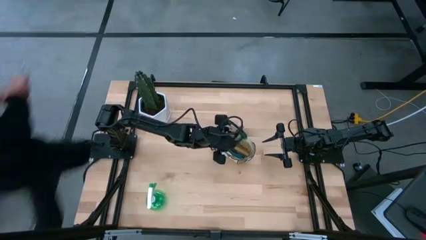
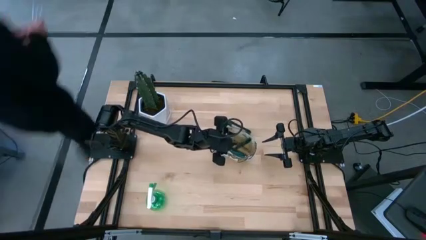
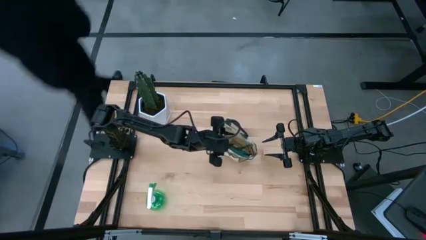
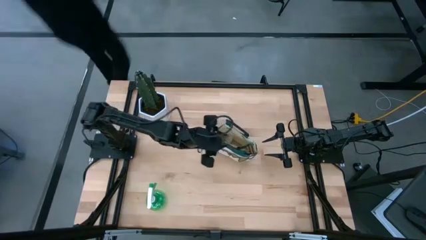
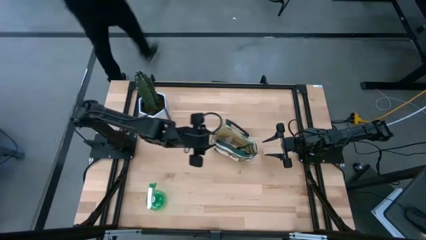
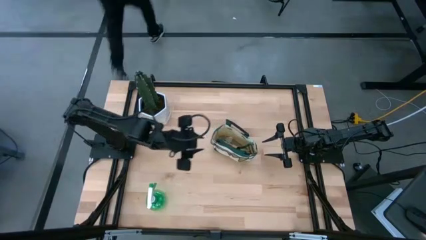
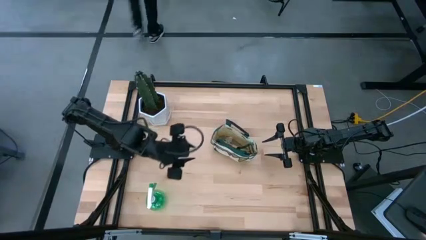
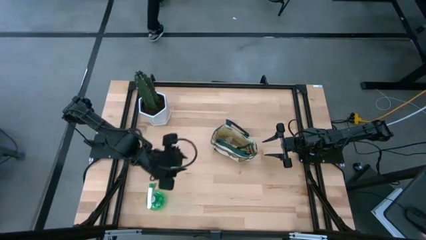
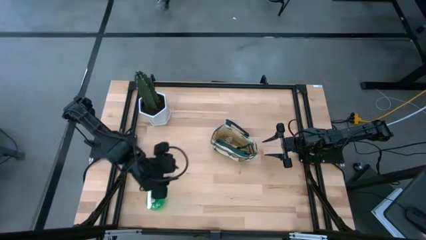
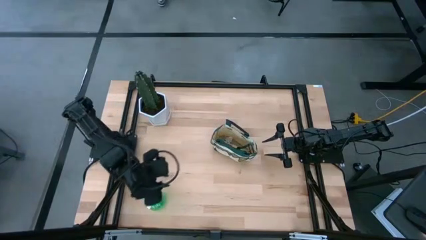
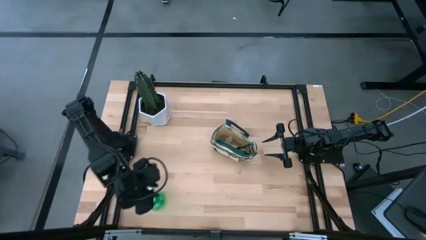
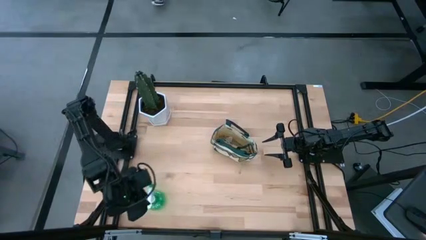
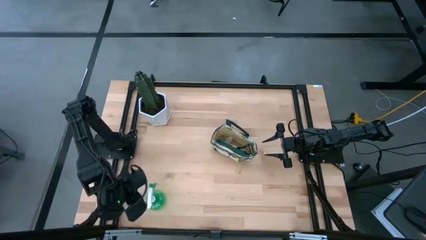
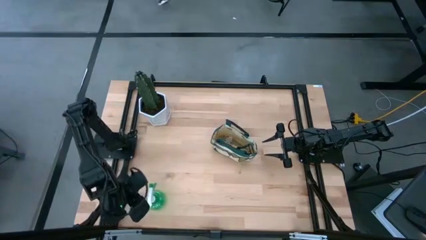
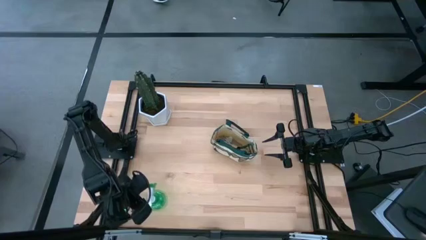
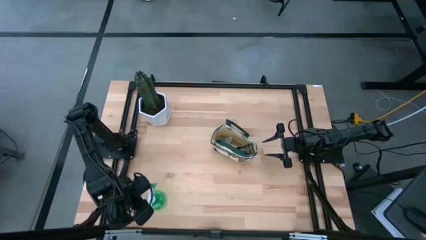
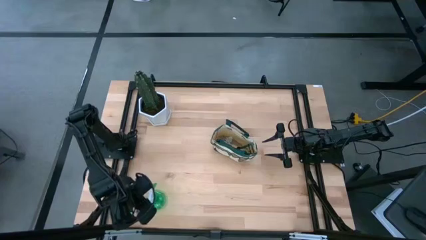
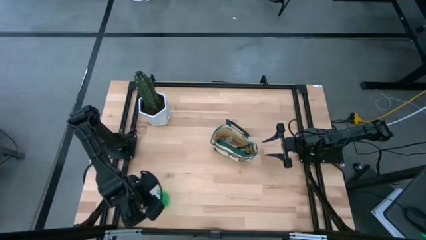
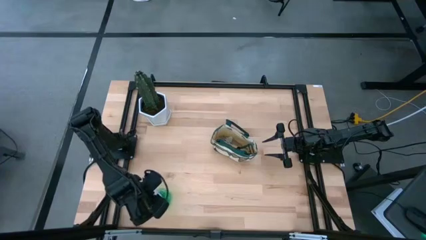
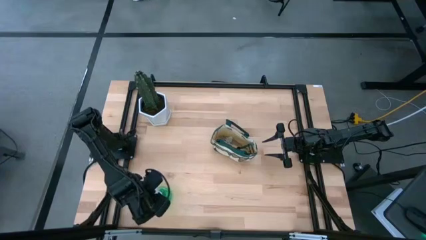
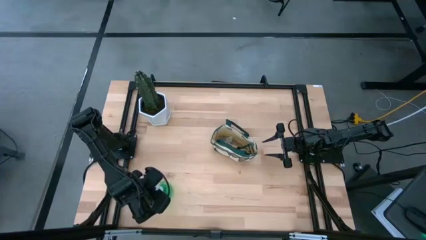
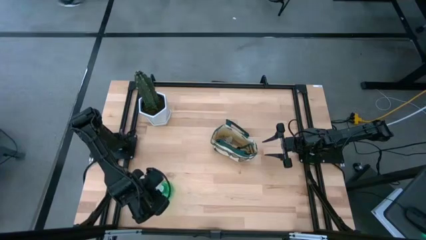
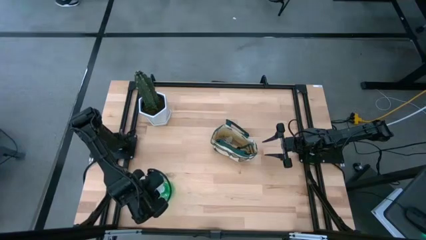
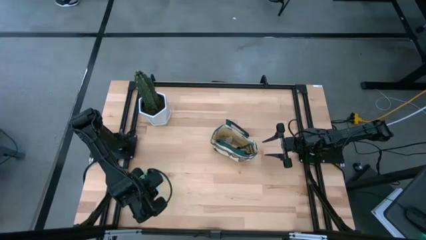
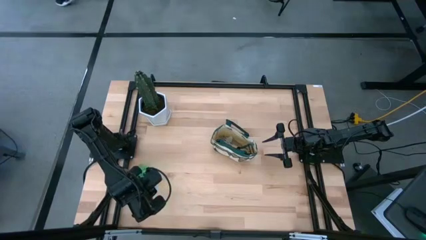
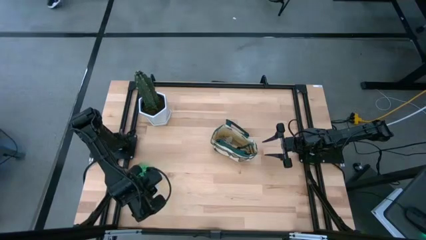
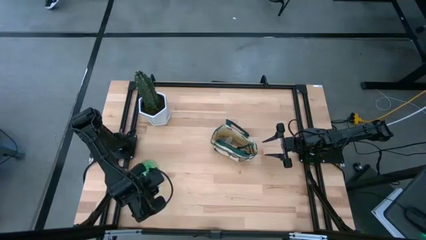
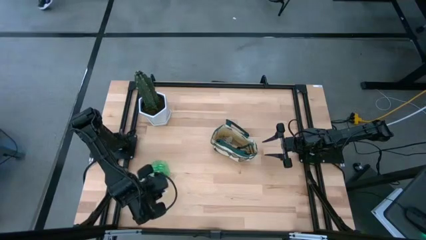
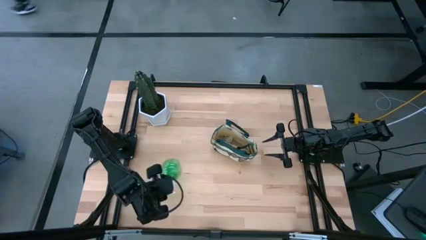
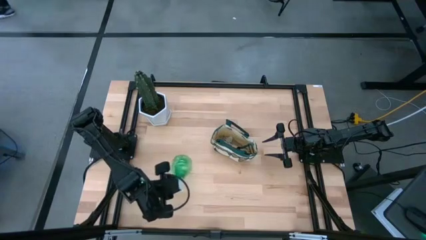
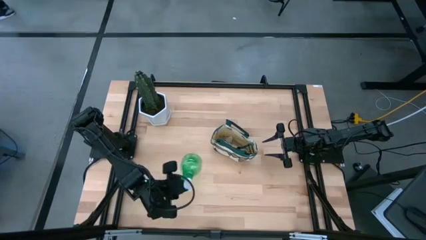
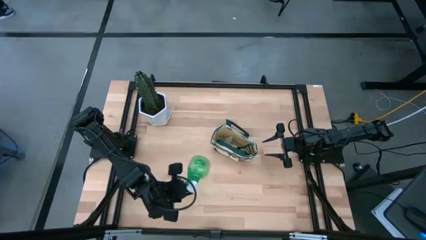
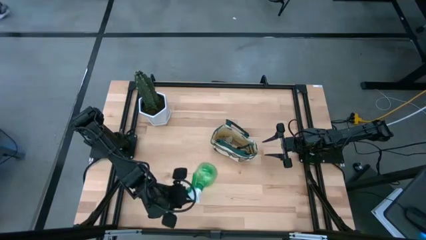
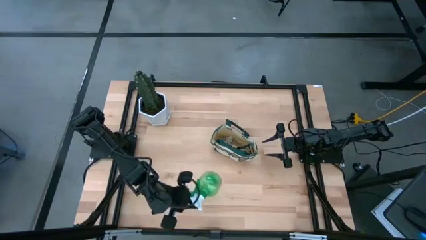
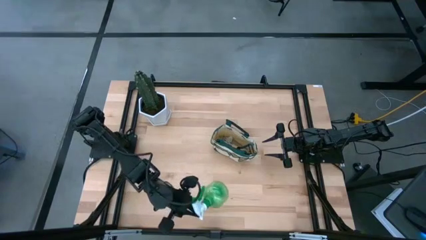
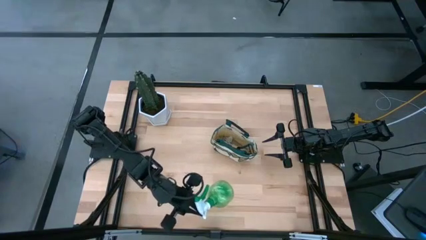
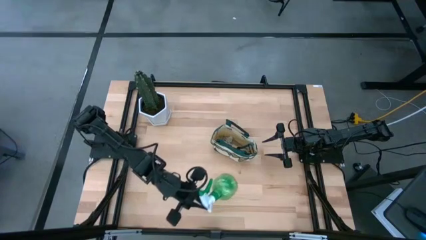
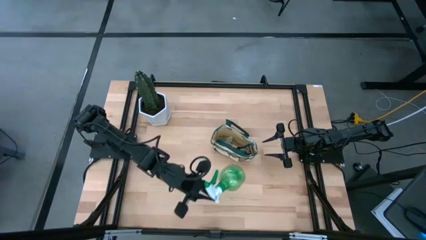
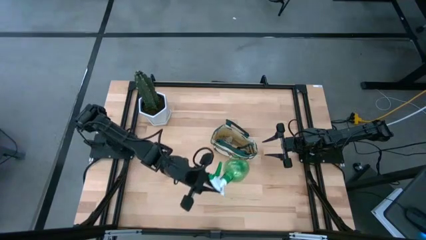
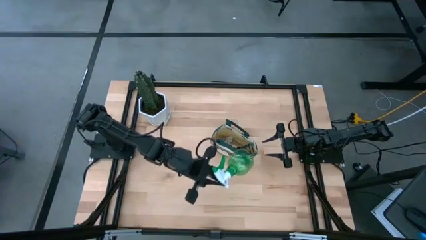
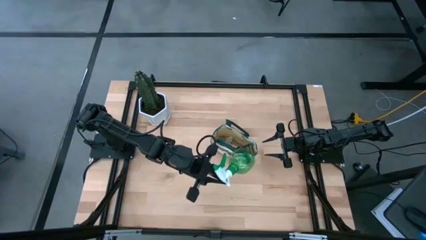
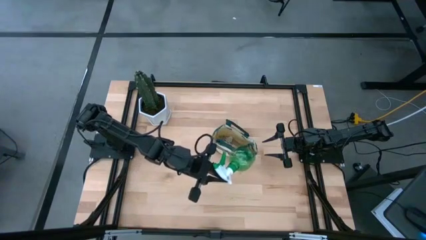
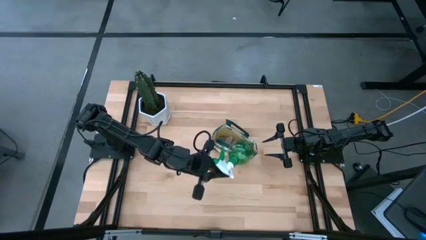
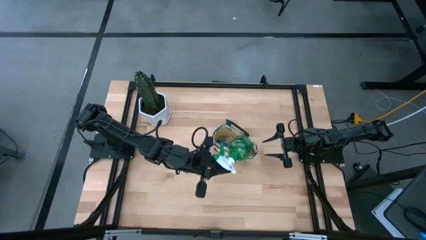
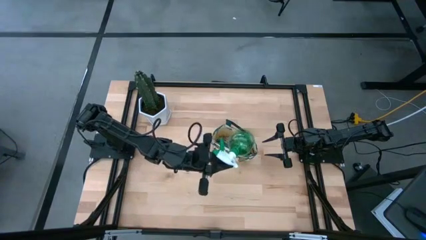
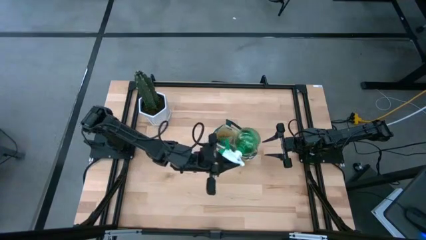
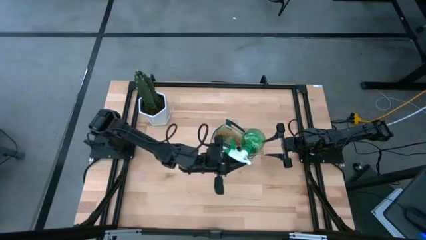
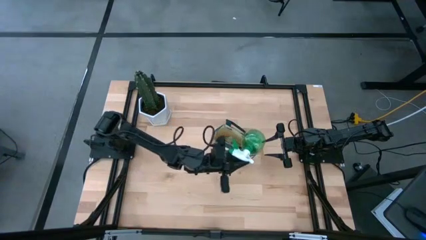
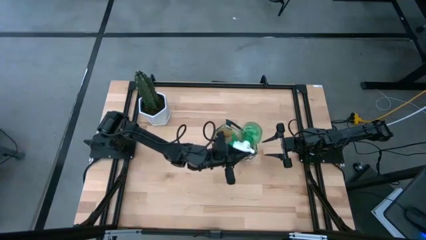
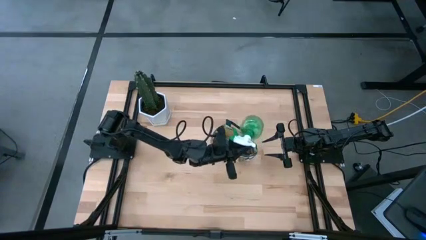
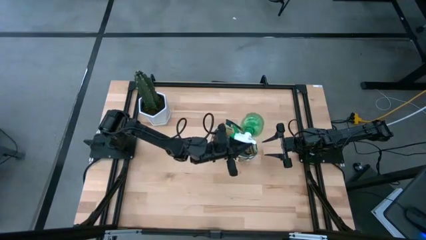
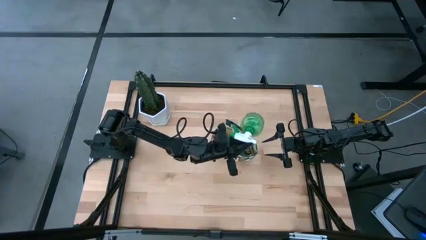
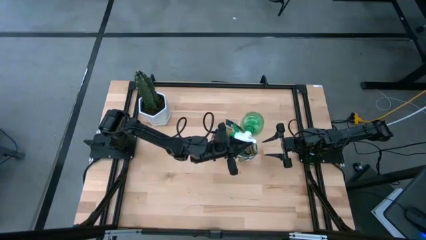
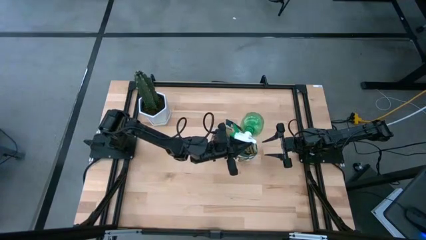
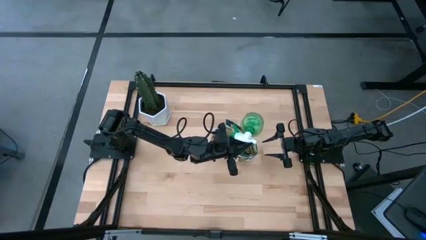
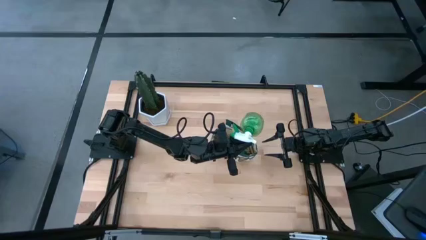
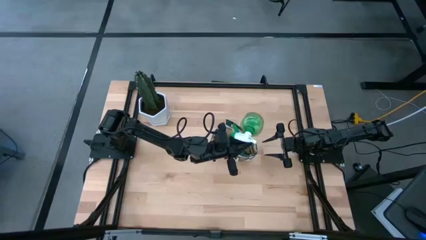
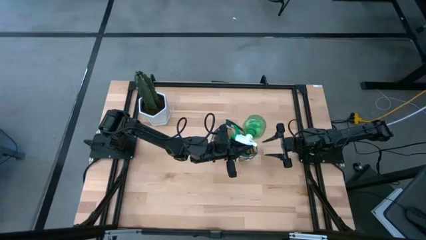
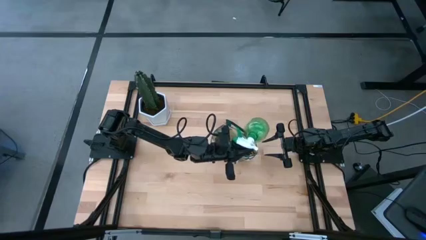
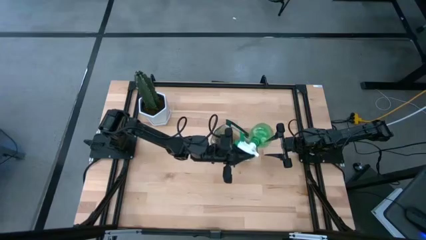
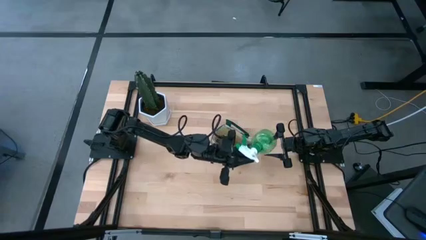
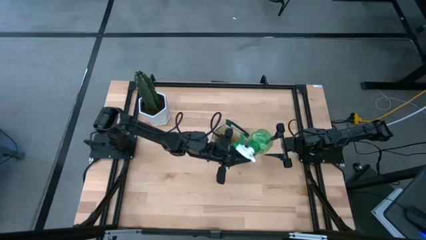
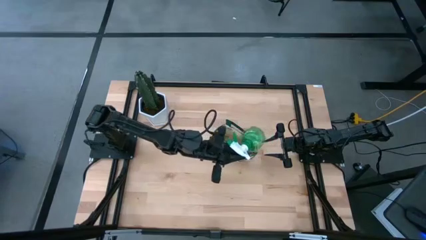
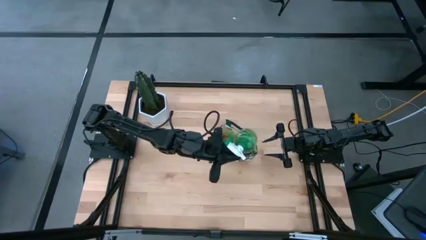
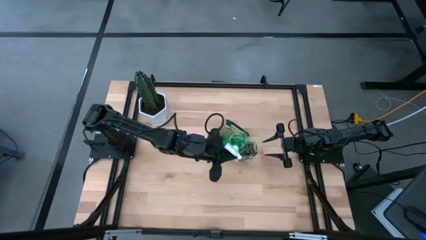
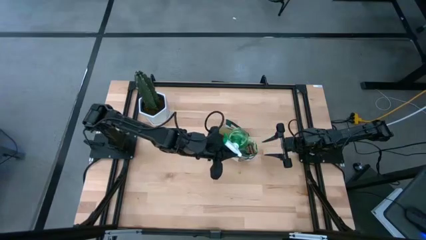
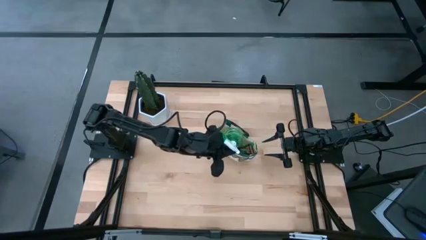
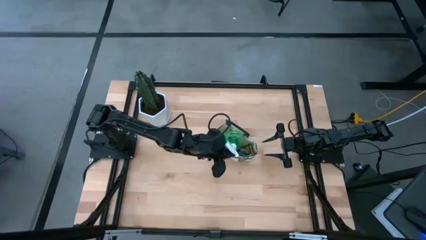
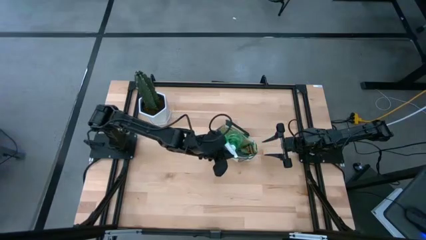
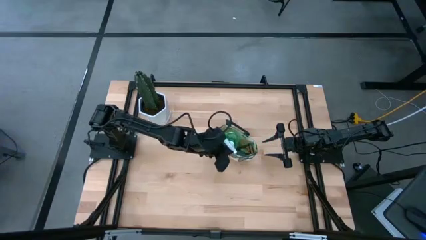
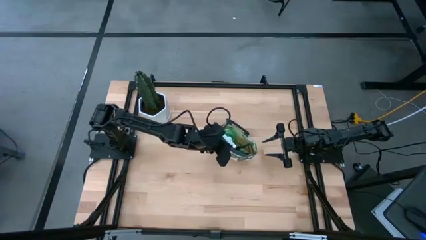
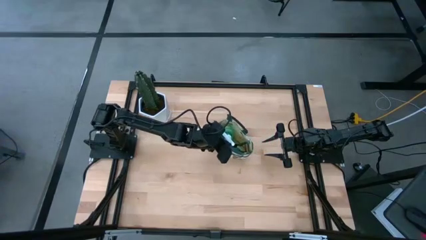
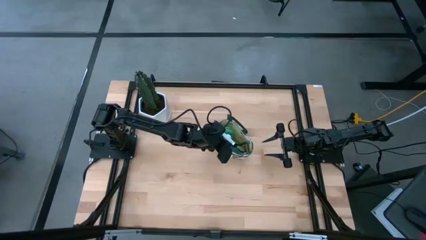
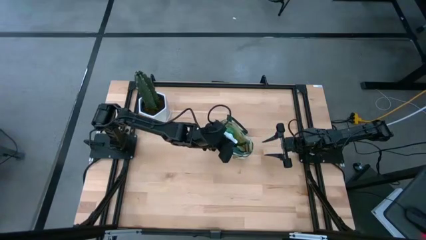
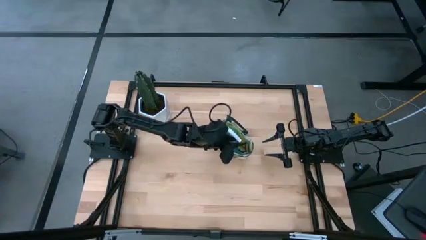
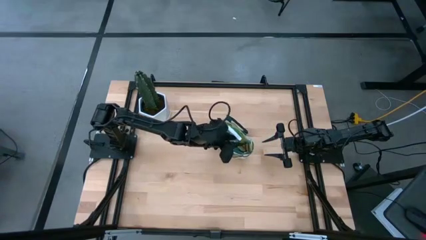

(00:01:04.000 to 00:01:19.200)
Task: Pick & Place Garden tools in Gardening bag
Put the green spray bottle into the gardening bag

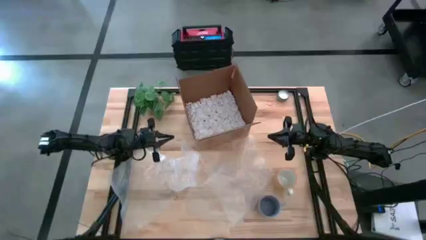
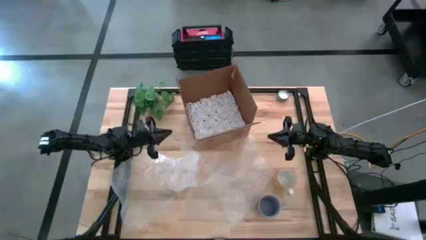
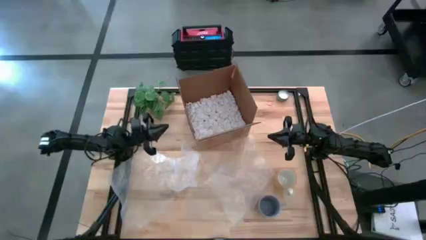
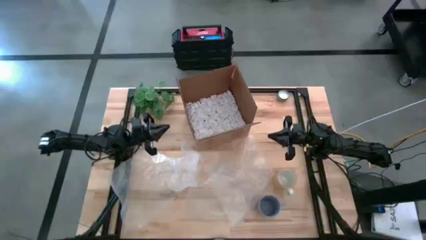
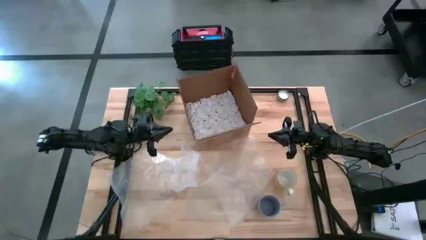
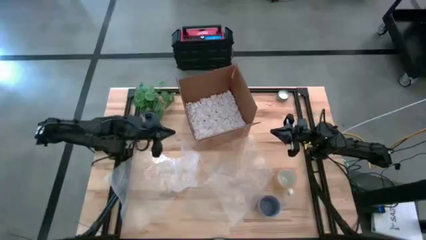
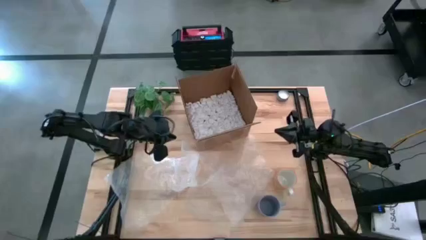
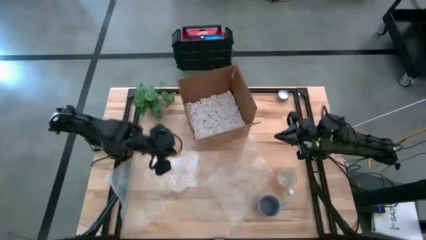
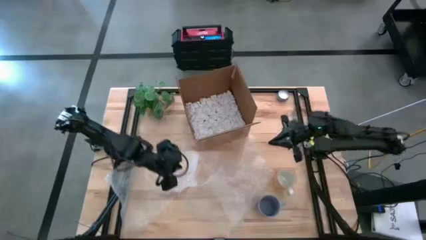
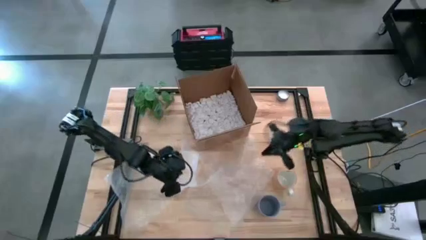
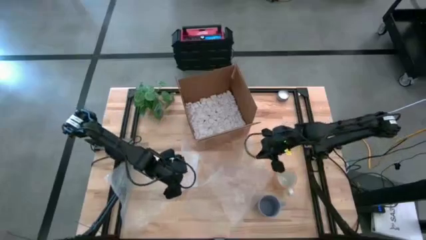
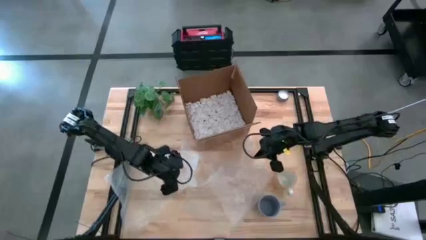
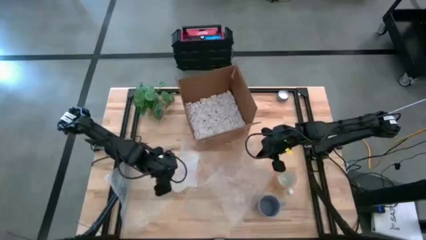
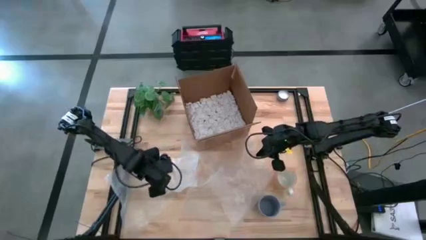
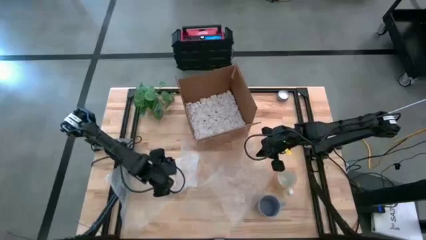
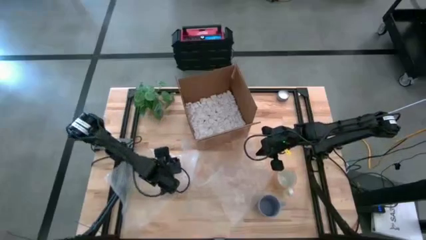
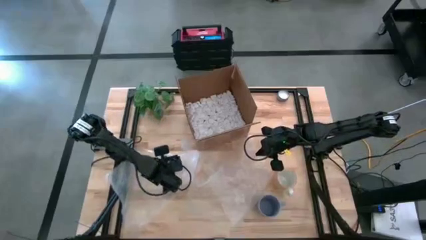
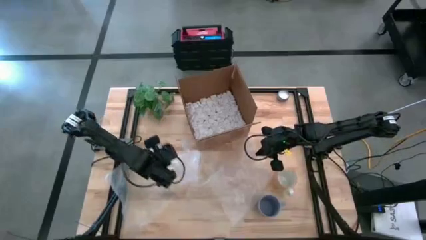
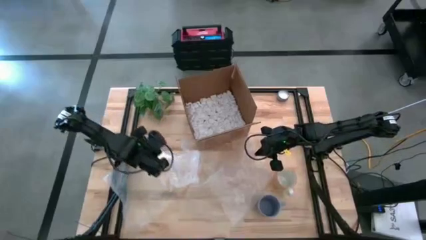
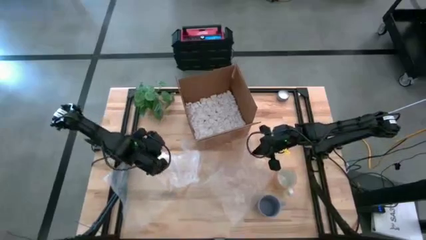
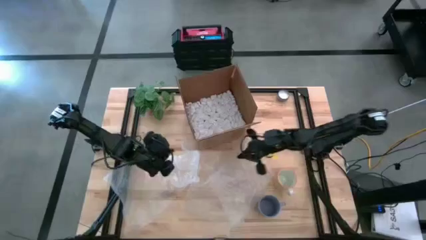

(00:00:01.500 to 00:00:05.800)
Task: wrap mug
Prepare the left bubble wrap
